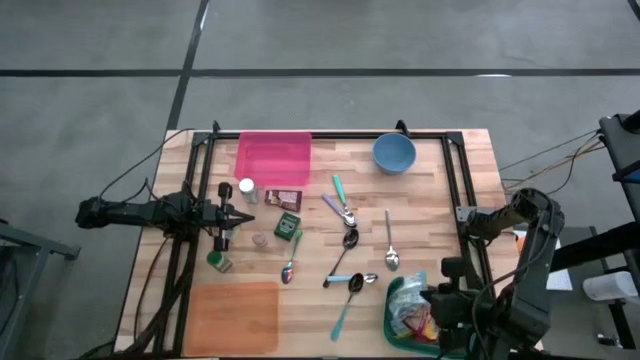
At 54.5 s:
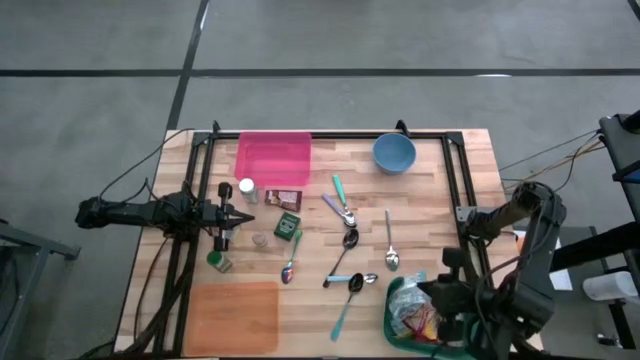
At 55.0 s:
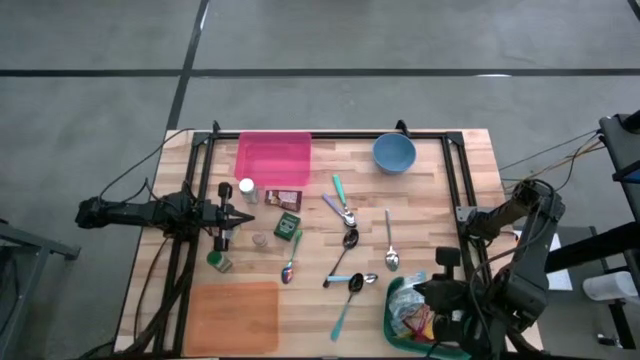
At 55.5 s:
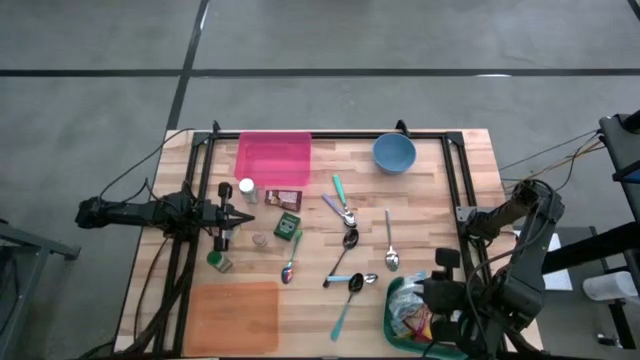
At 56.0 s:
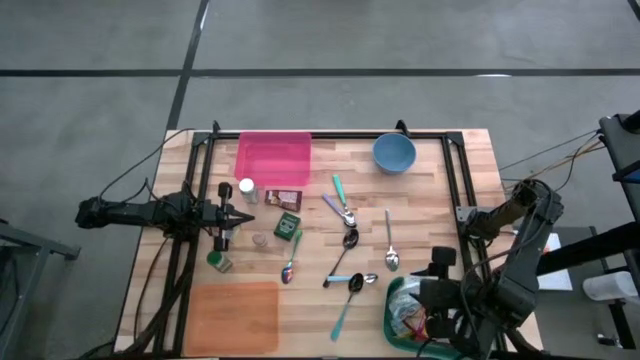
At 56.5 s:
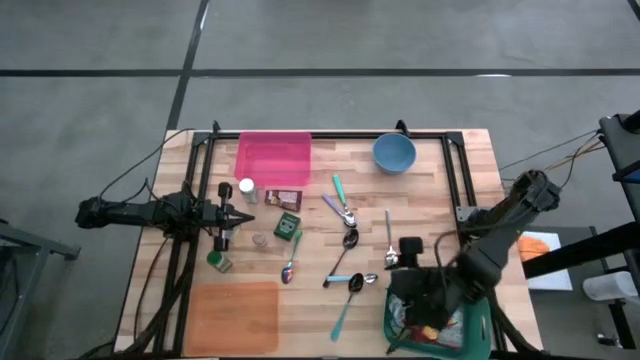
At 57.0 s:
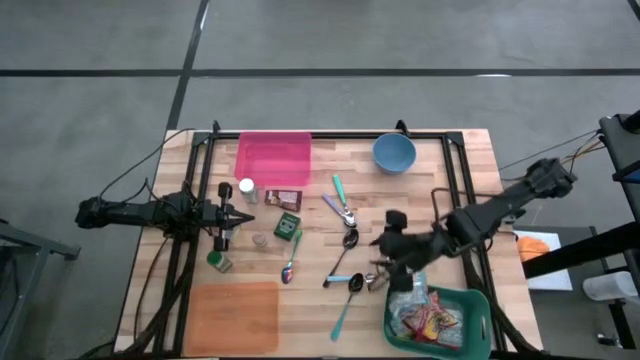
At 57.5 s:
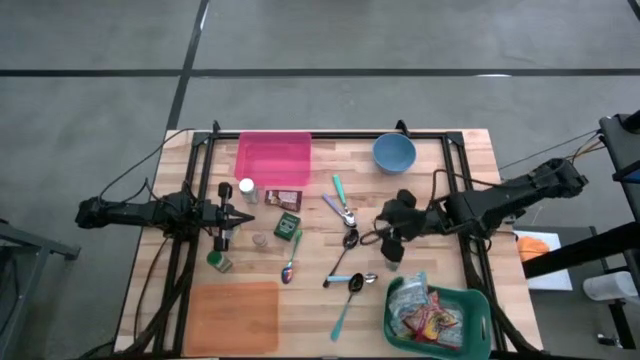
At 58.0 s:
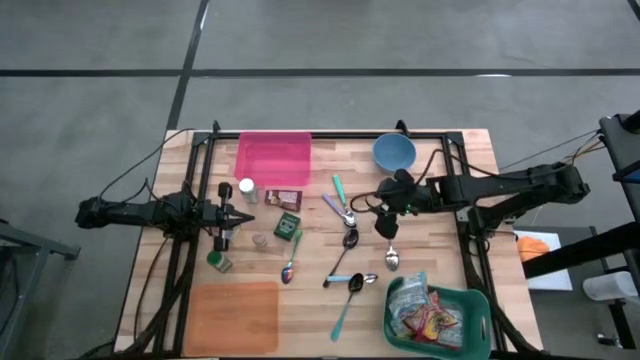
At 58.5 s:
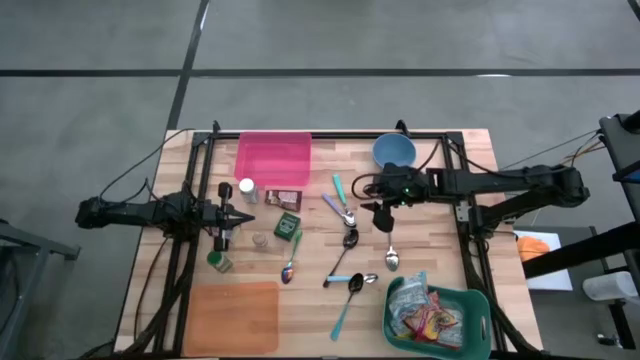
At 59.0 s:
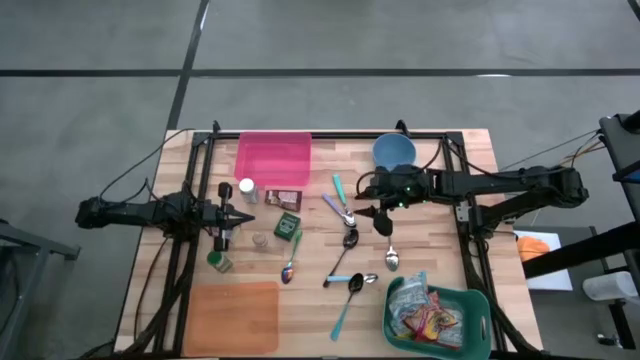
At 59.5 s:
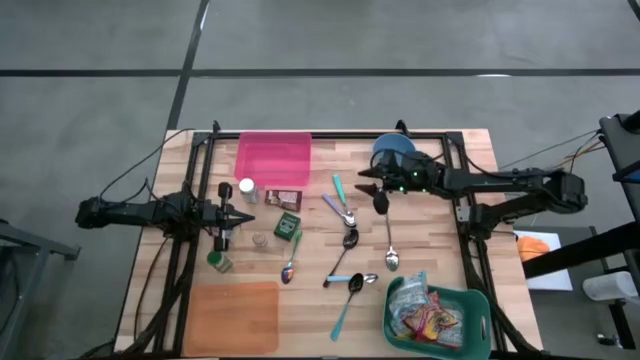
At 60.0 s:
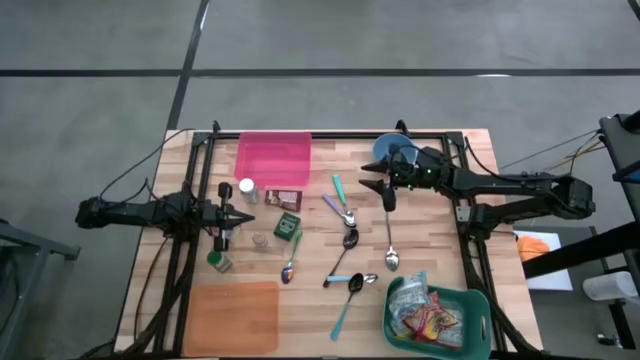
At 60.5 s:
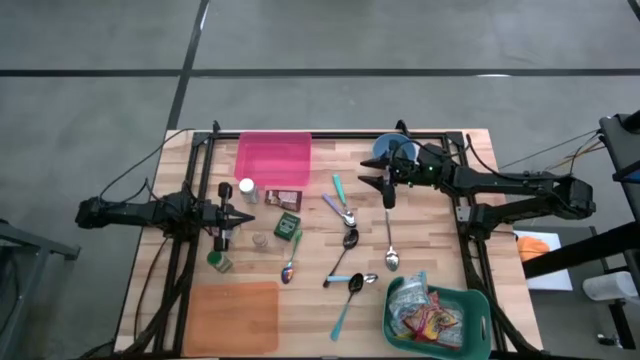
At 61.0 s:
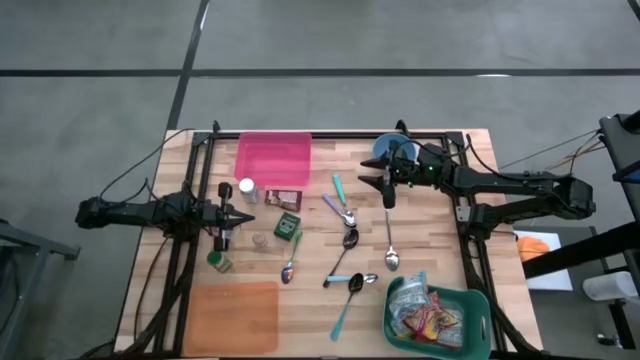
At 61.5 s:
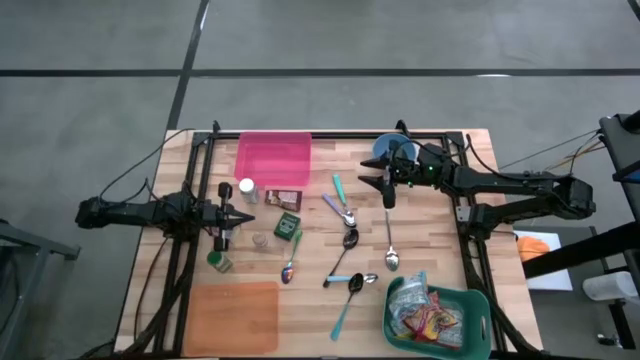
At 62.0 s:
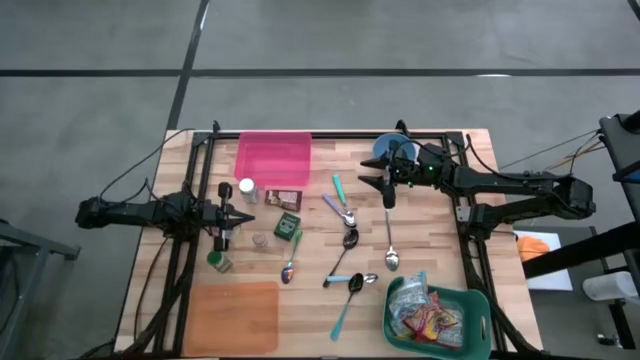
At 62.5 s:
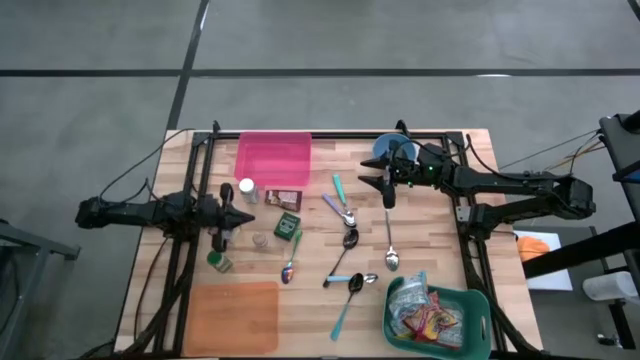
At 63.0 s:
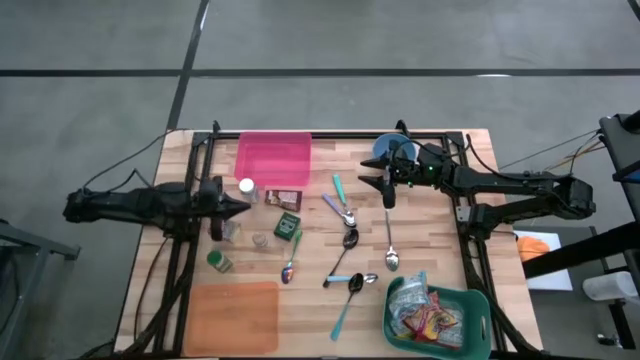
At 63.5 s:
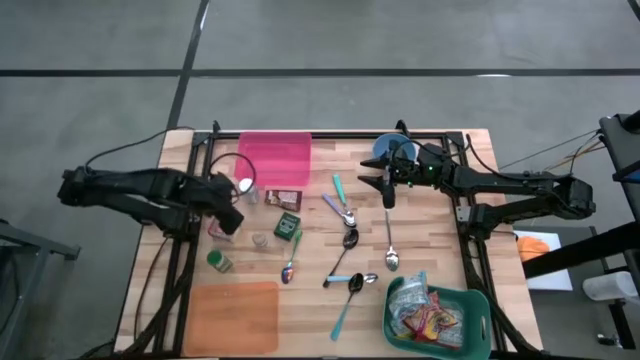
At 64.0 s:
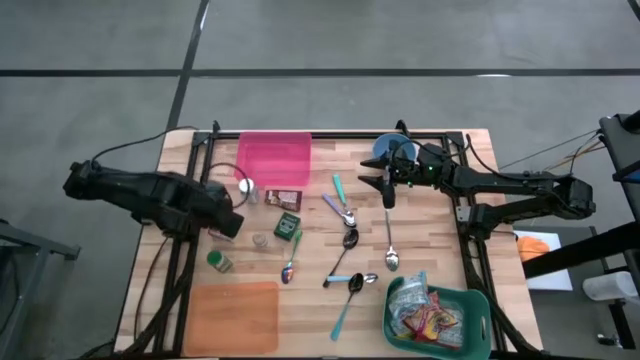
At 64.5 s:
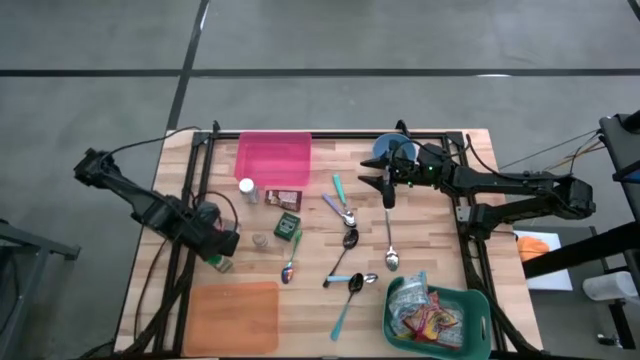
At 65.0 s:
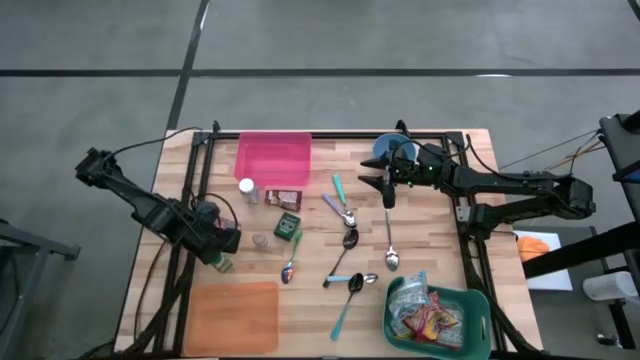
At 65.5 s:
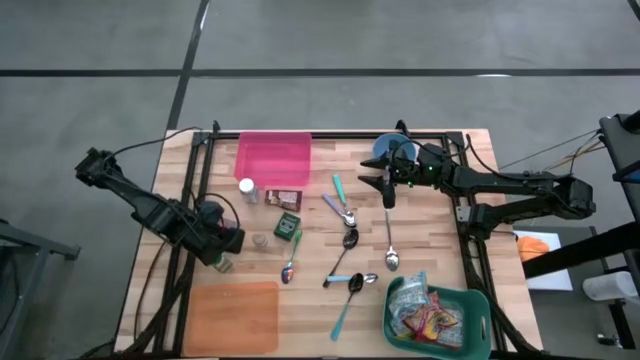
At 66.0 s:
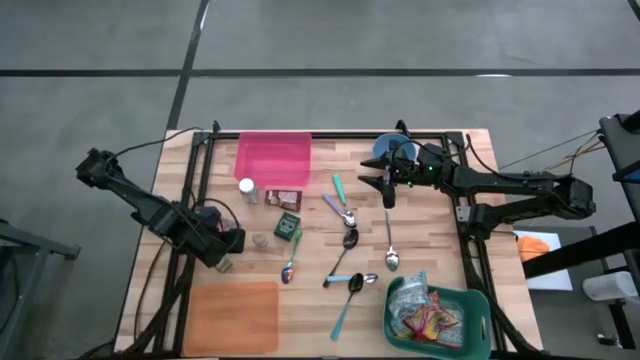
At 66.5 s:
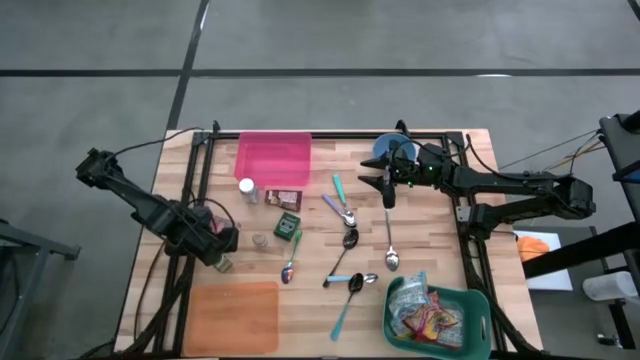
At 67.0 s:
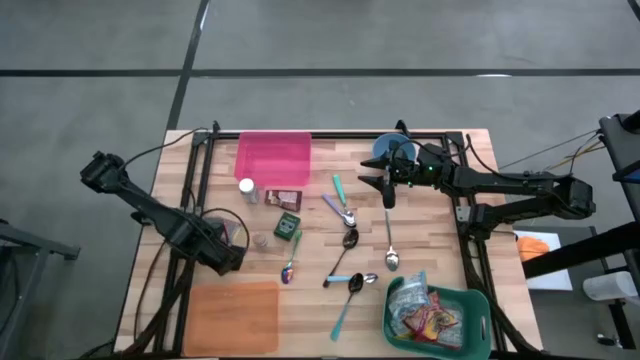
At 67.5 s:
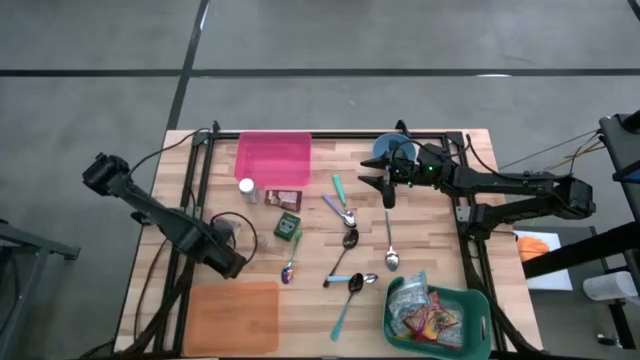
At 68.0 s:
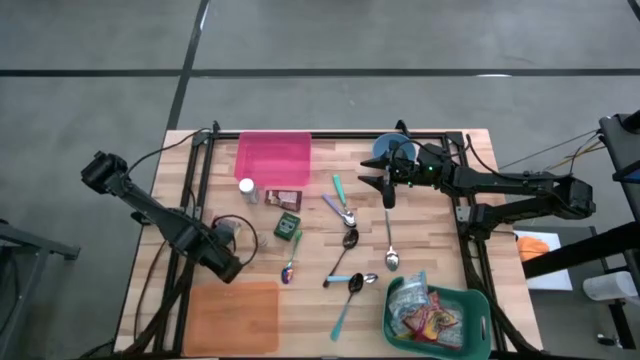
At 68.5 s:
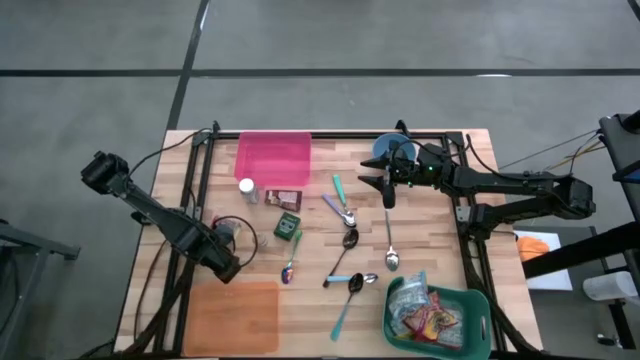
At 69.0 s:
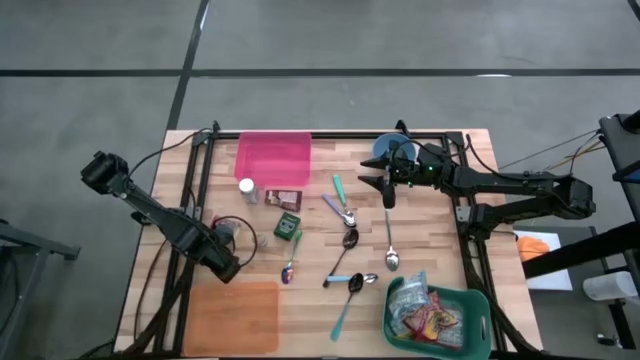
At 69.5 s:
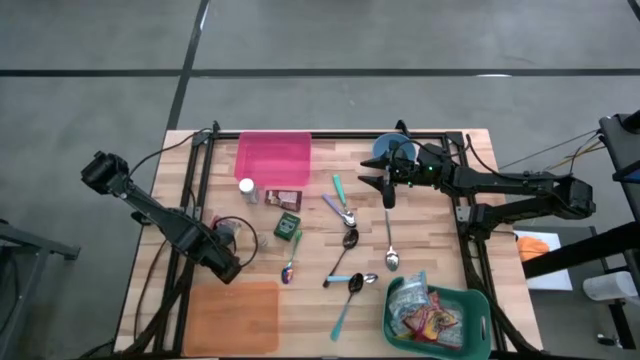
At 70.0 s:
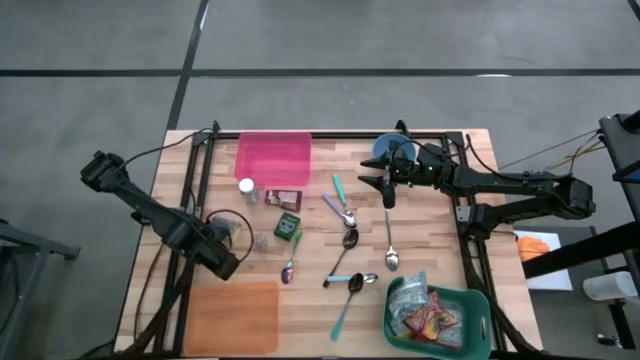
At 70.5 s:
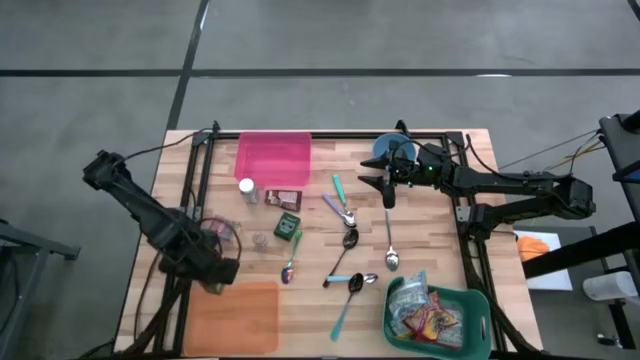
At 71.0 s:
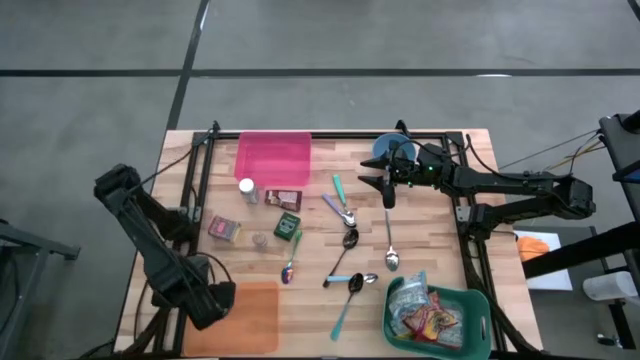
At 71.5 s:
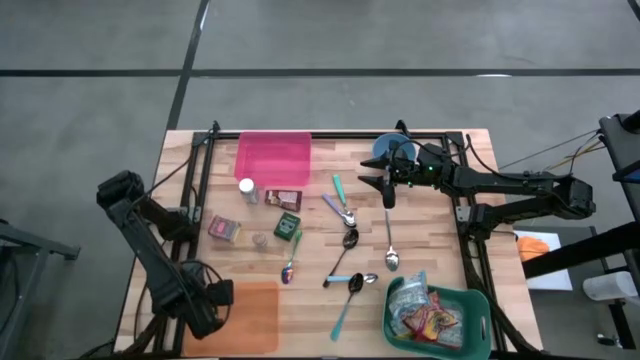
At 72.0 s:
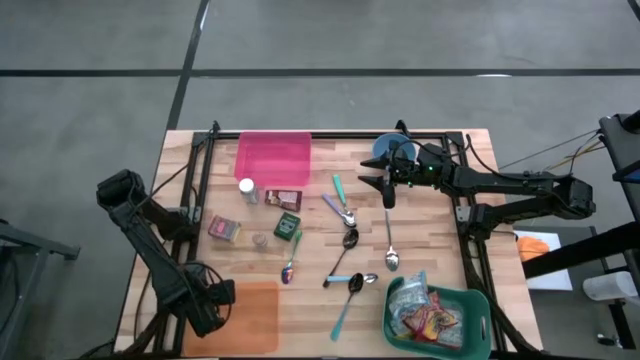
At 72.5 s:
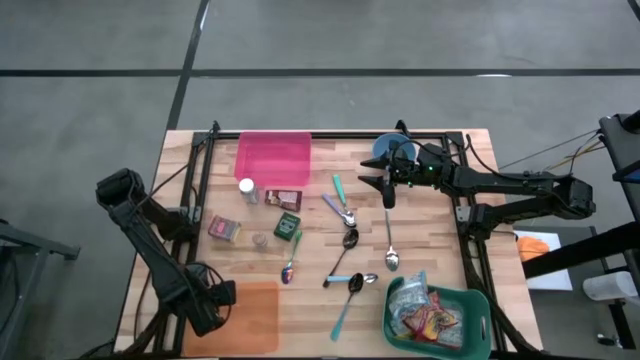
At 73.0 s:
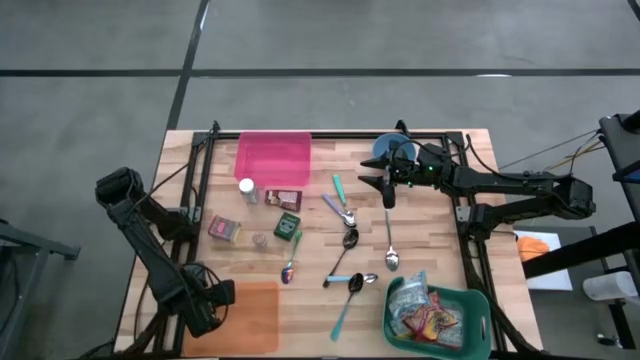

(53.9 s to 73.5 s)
Put the green seasoning bottle into the orange bin
